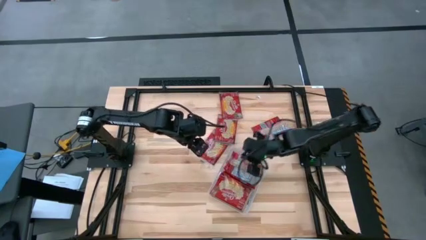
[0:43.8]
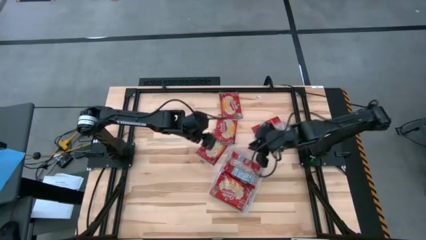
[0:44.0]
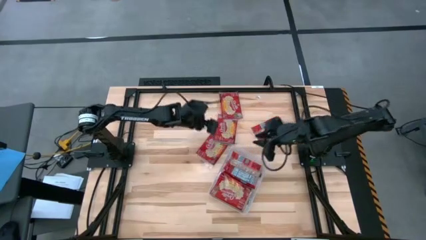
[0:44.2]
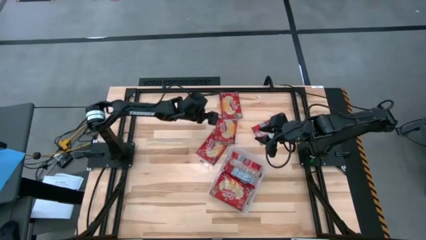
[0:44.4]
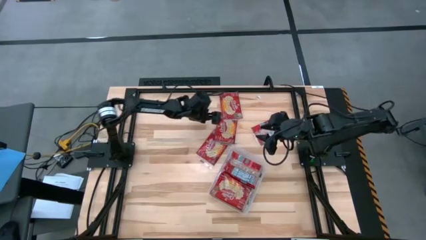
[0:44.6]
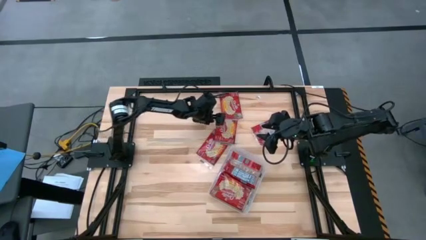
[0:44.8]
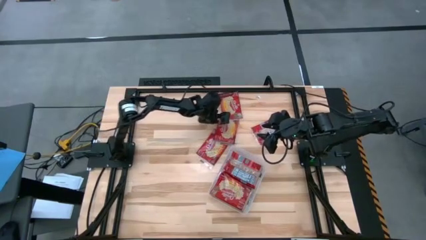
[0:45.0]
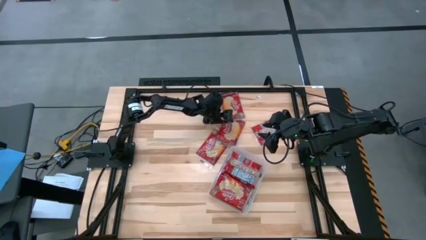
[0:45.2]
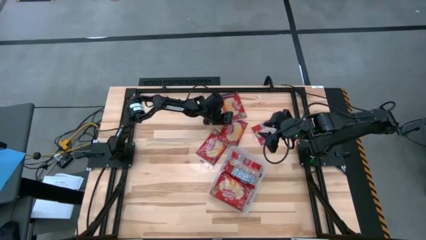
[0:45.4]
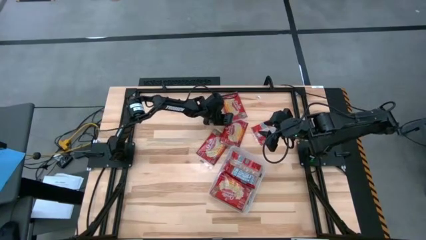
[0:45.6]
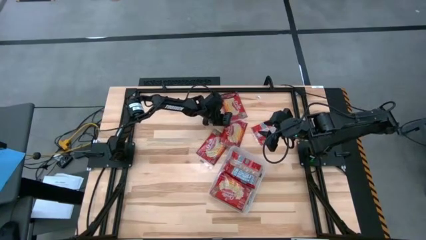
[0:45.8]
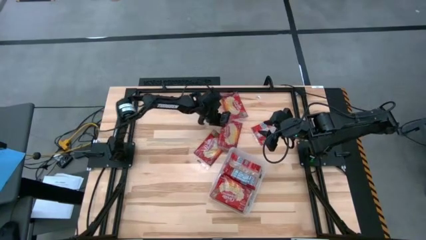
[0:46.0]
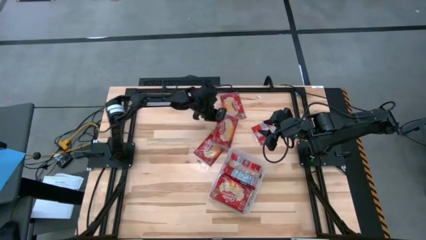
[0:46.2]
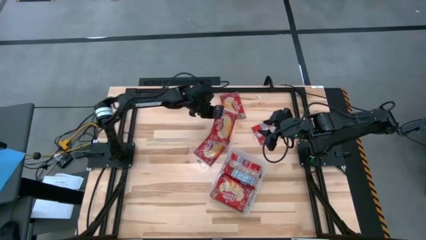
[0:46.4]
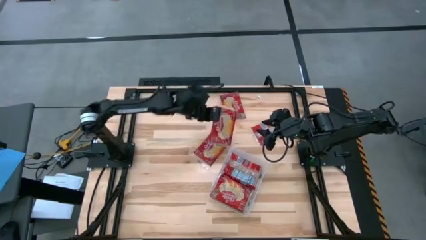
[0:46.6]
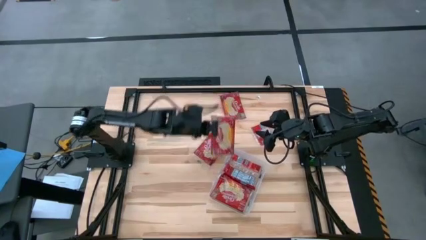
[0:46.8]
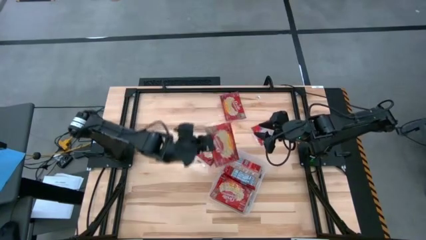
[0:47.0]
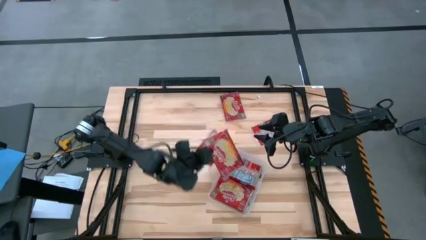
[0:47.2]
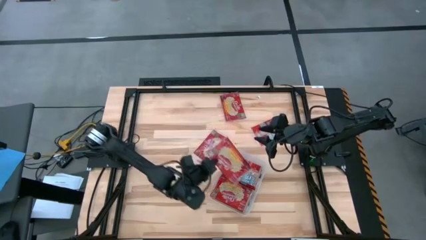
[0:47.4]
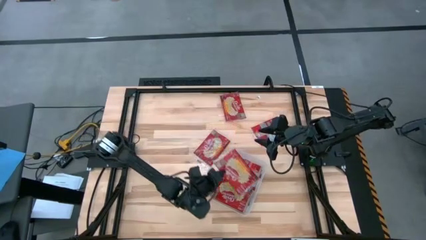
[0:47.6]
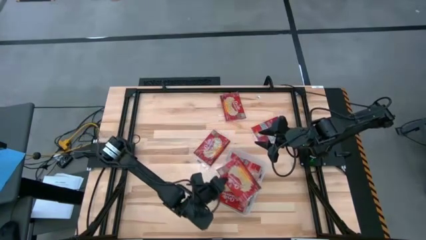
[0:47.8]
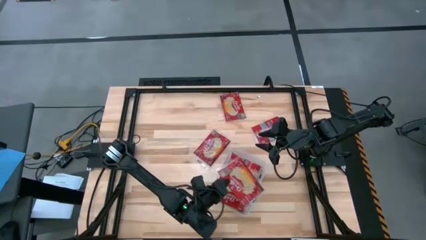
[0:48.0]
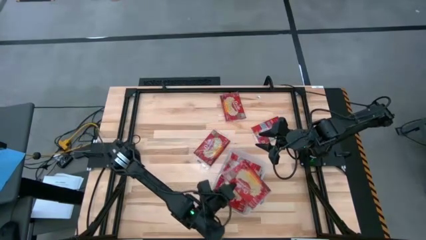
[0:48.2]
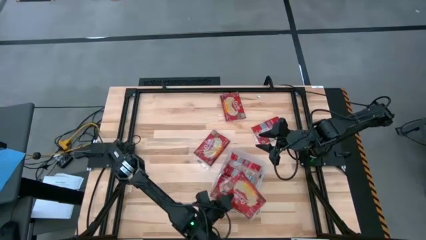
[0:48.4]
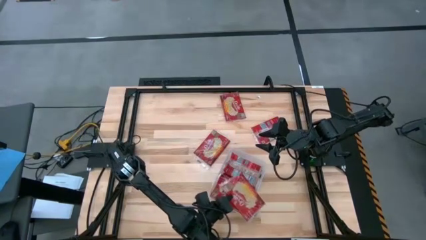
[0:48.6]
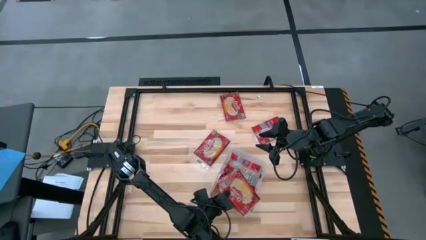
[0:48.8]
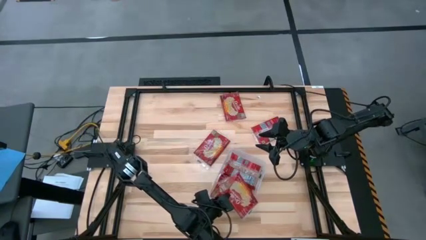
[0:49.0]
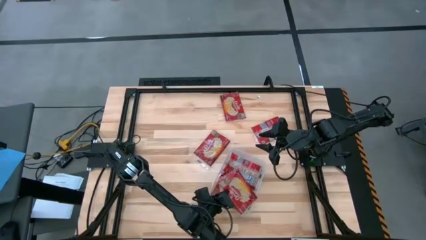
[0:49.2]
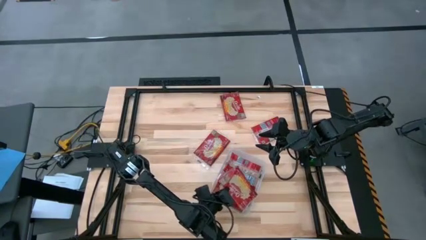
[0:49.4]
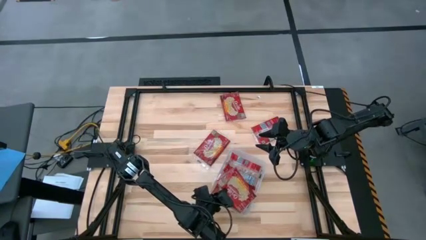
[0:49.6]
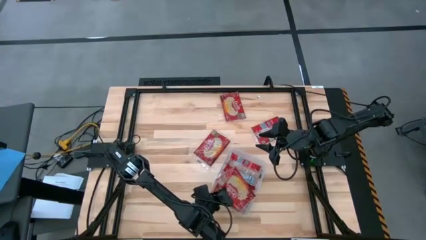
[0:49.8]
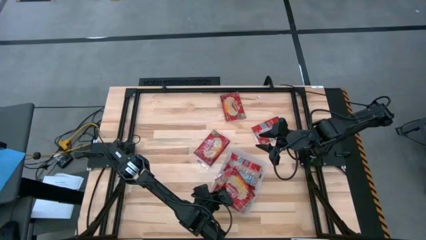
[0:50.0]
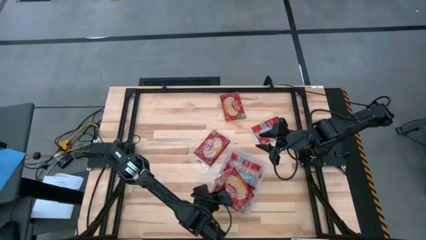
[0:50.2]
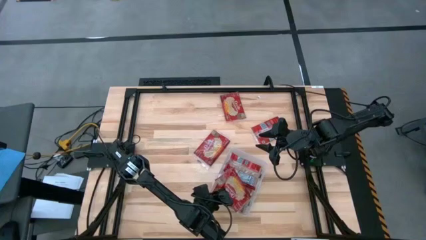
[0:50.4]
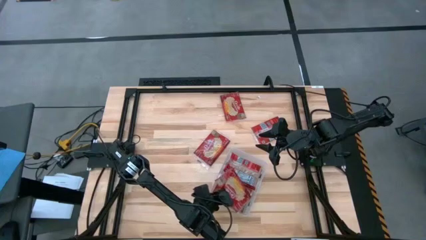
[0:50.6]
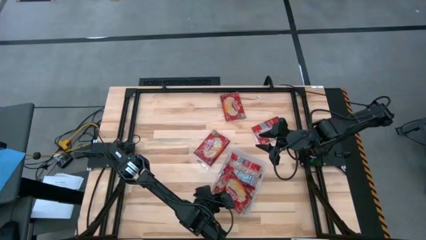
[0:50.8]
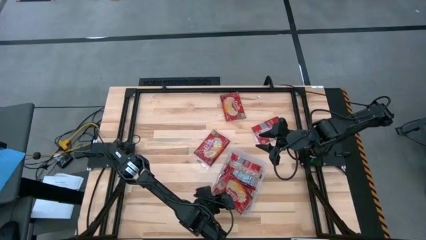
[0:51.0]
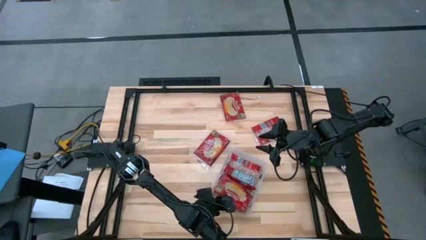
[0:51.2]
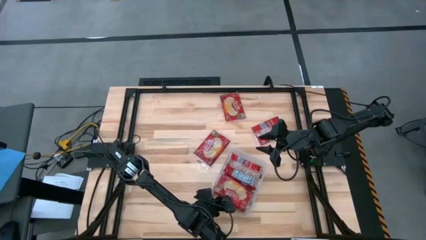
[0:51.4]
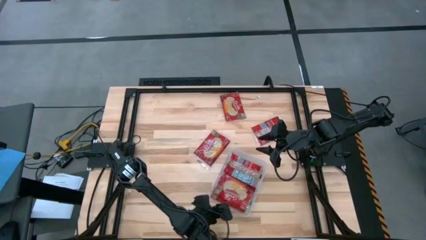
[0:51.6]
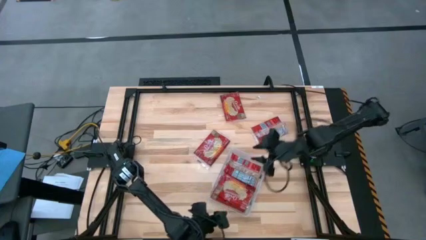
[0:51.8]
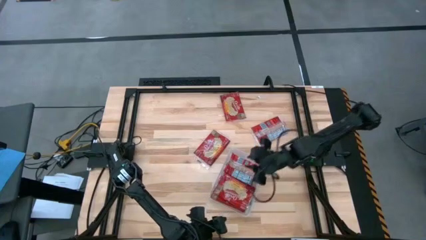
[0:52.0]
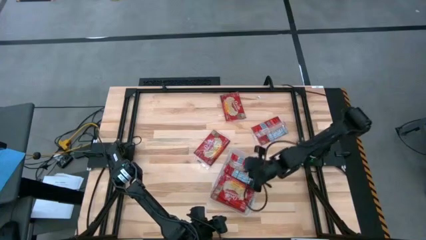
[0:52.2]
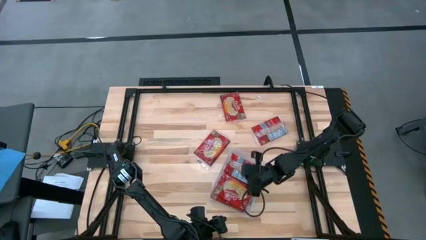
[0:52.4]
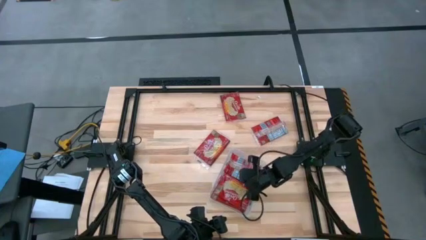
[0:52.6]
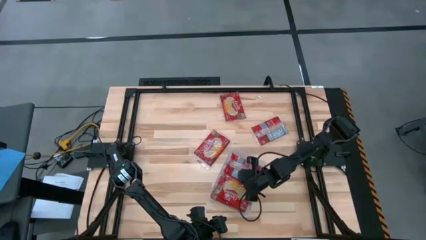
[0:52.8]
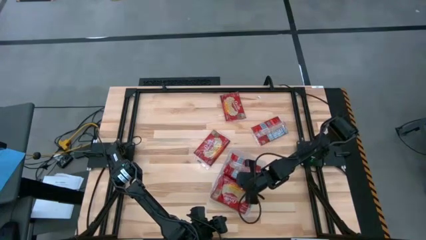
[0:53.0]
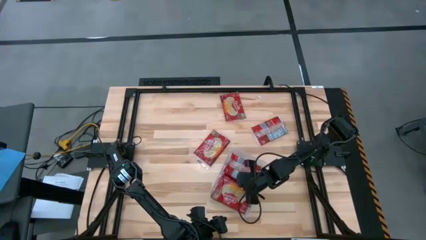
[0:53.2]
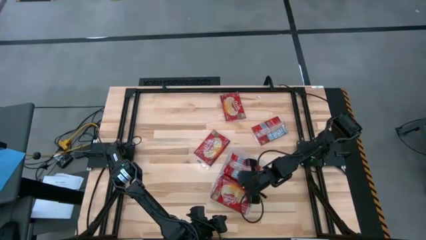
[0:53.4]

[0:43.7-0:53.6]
Task: Sort popcorn bags into baskets
Put the red popcorn bag into the transparent bin

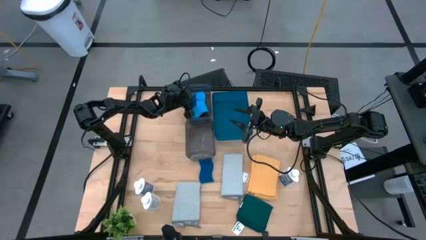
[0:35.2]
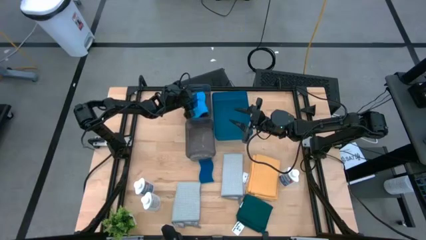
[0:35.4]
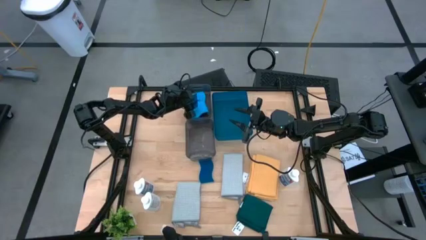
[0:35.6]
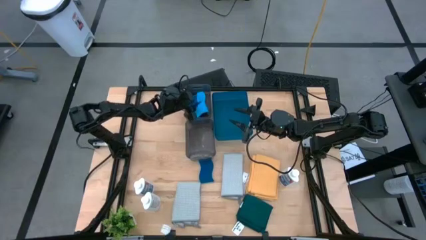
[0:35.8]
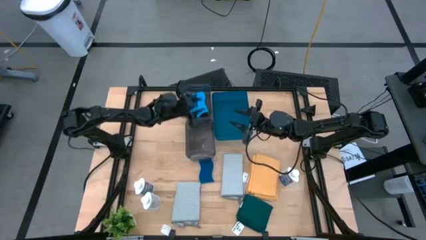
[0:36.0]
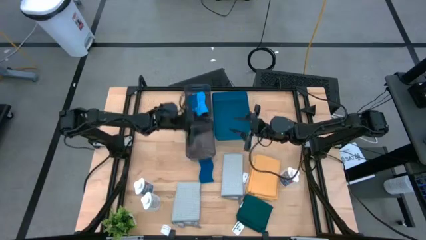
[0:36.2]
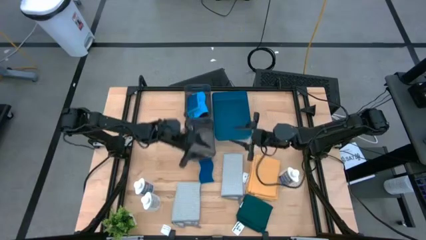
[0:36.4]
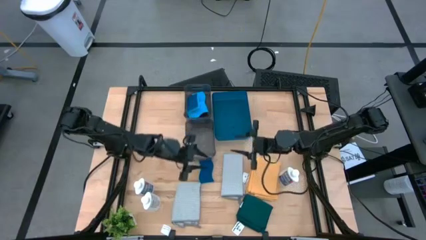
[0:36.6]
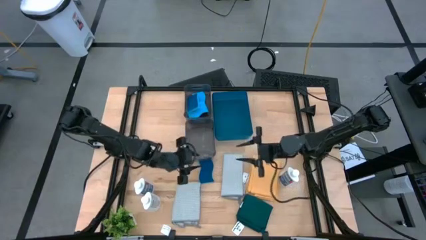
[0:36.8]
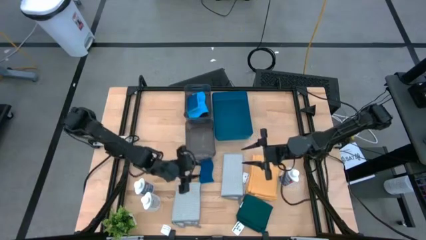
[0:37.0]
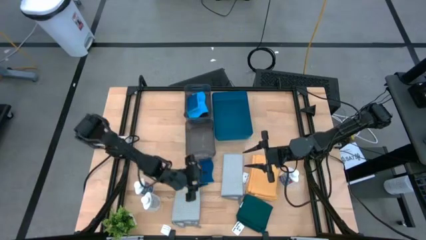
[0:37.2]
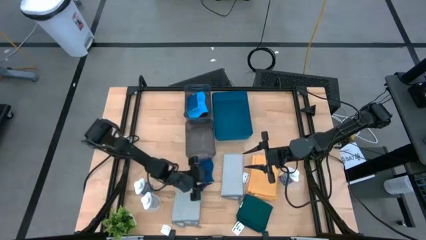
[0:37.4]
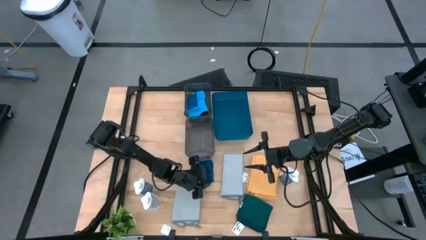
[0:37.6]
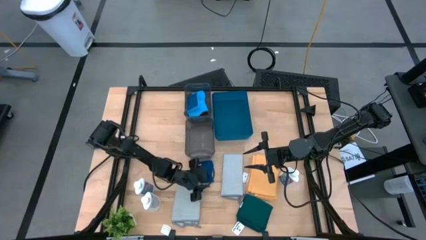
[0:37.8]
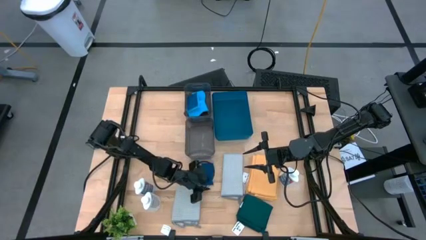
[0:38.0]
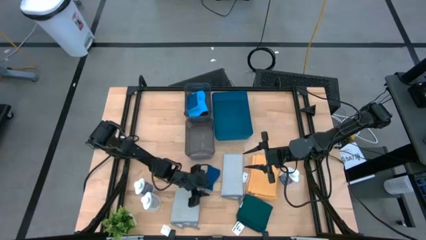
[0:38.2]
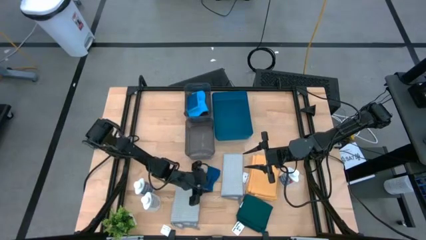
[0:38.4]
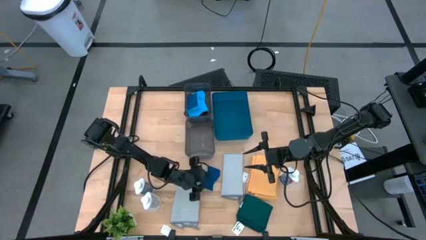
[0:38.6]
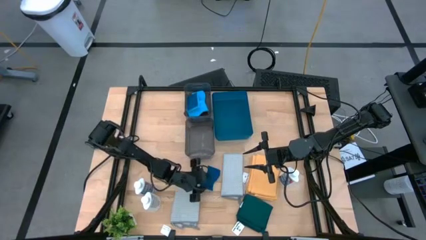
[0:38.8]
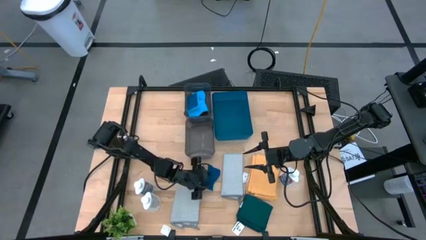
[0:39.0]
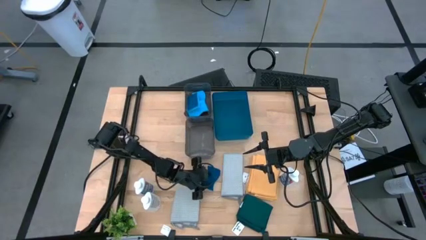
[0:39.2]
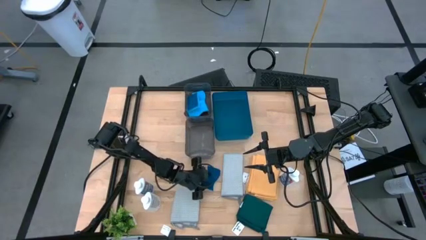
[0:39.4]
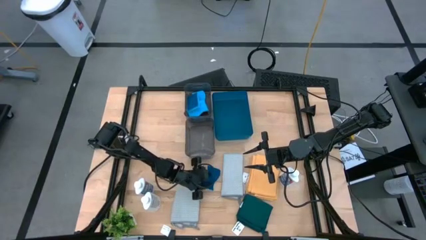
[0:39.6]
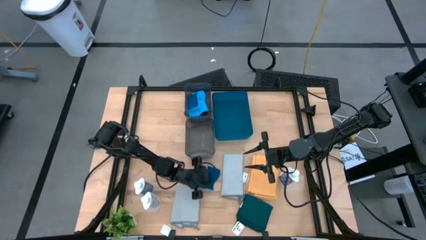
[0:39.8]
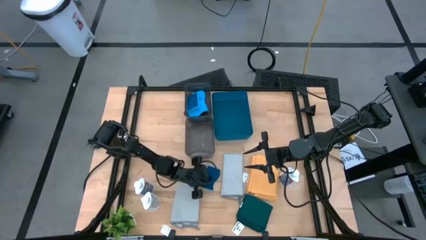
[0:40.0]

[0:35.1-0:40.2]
Task: Pick & Place Kitchen Items
Put the blue sponge into the top black bin
